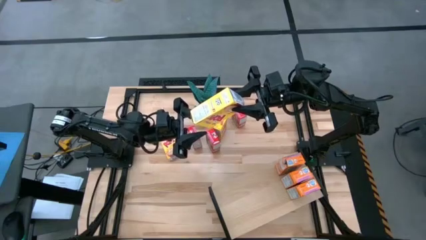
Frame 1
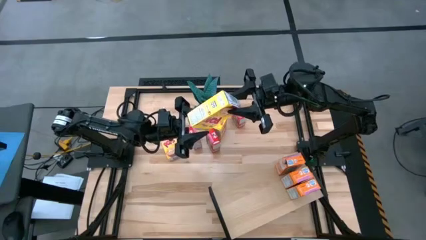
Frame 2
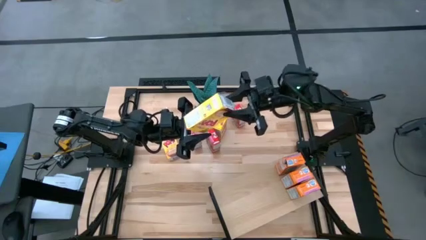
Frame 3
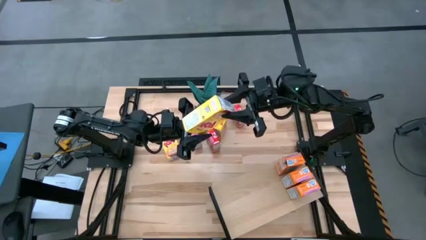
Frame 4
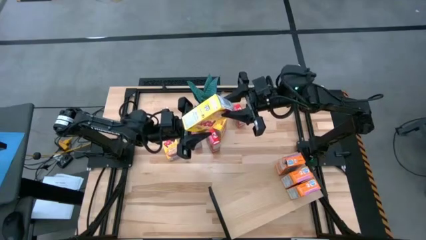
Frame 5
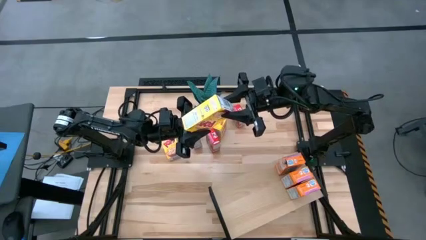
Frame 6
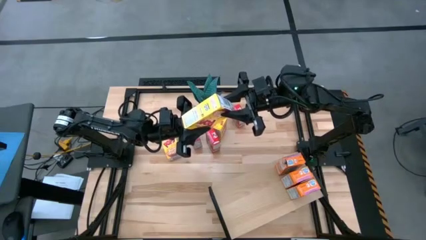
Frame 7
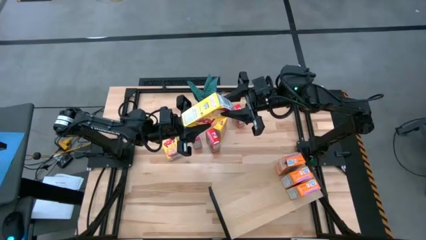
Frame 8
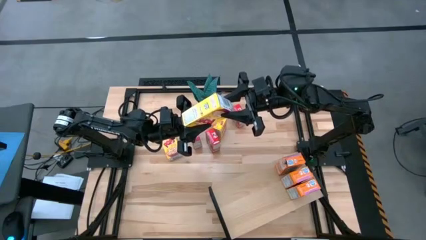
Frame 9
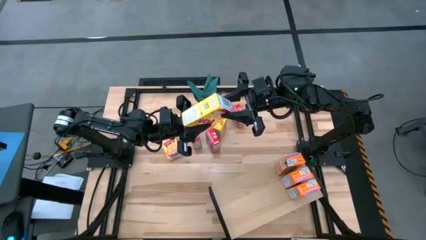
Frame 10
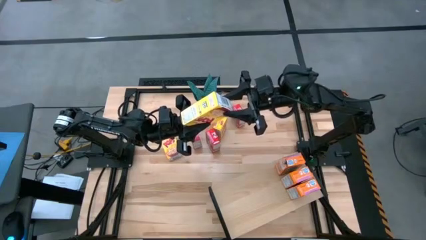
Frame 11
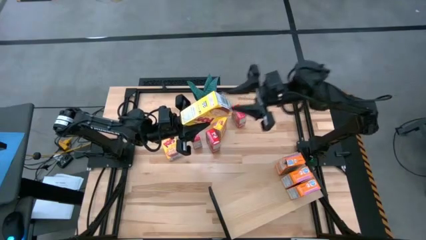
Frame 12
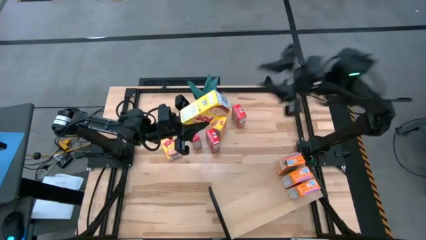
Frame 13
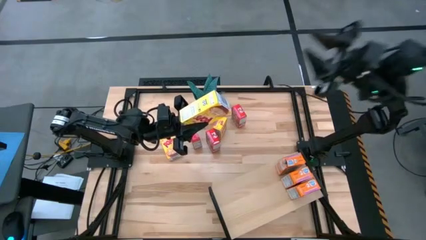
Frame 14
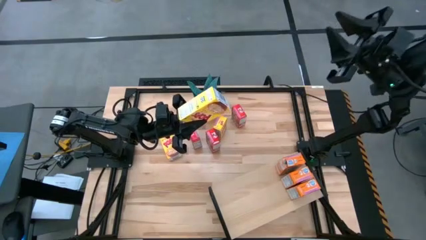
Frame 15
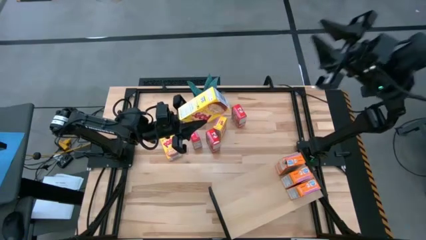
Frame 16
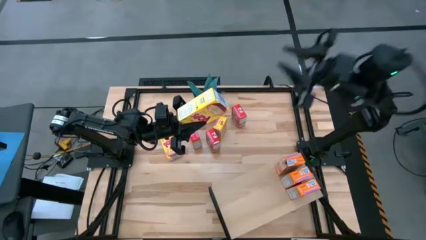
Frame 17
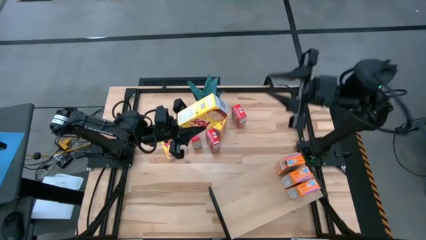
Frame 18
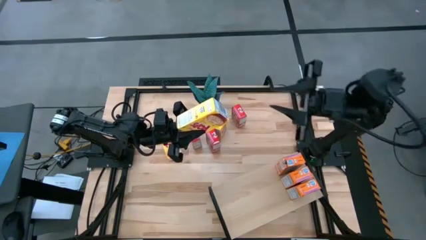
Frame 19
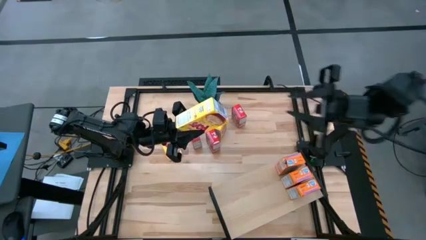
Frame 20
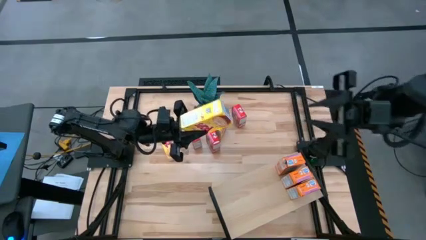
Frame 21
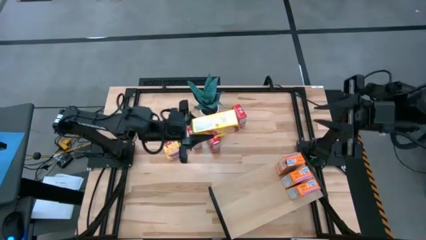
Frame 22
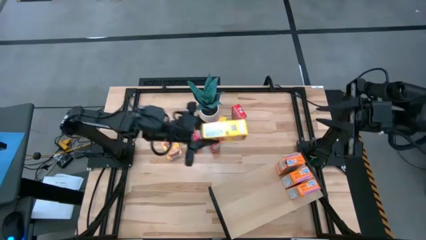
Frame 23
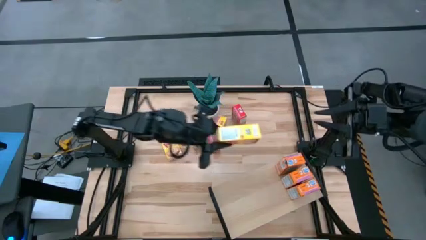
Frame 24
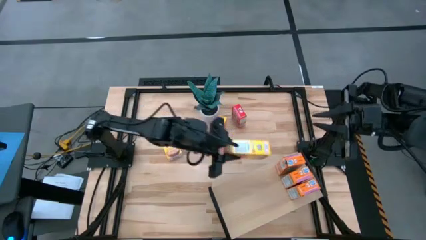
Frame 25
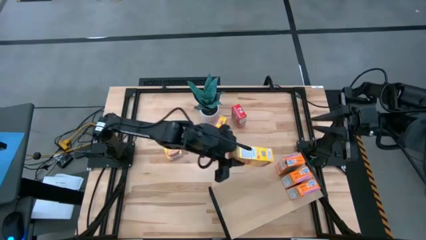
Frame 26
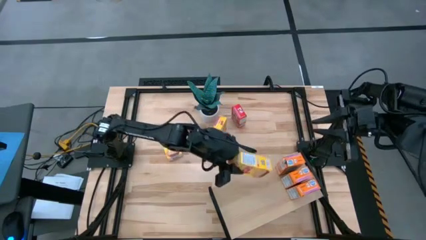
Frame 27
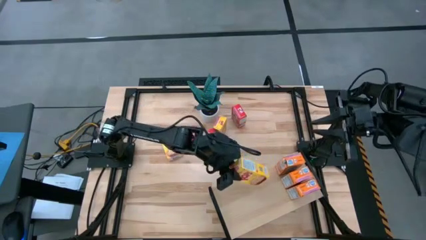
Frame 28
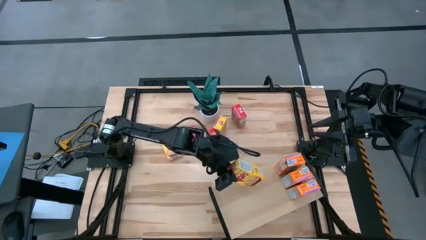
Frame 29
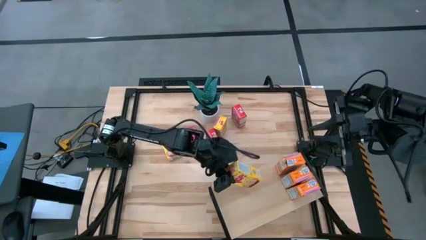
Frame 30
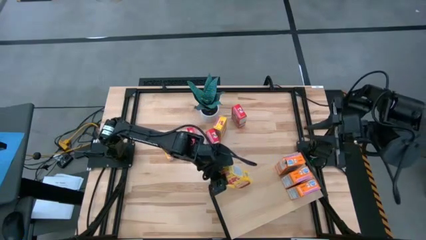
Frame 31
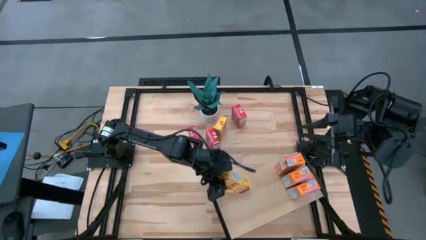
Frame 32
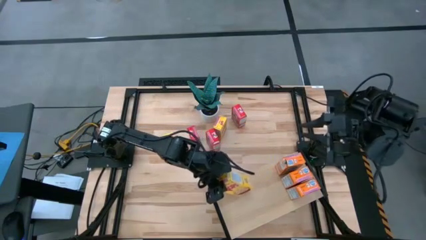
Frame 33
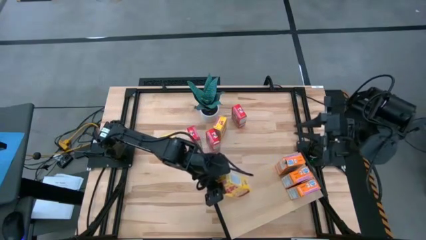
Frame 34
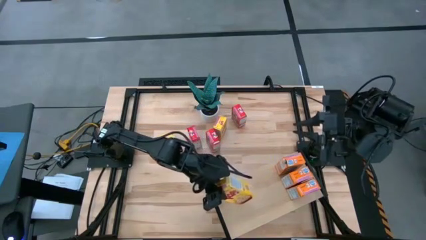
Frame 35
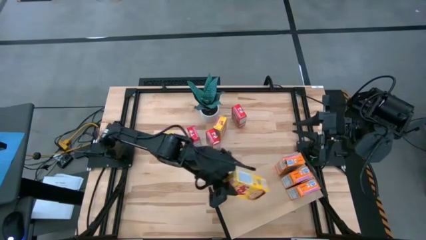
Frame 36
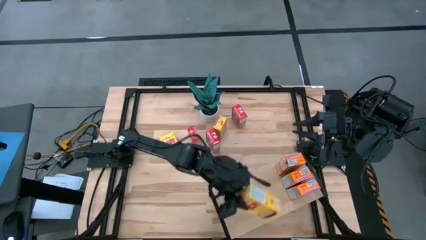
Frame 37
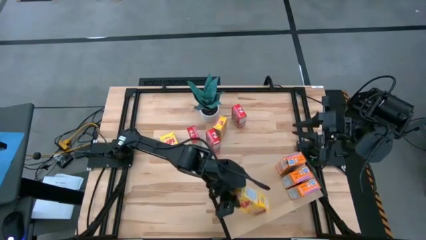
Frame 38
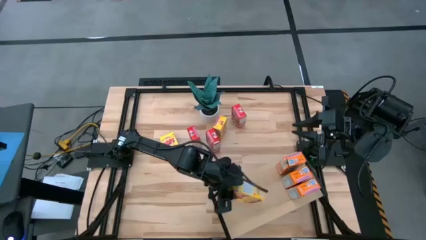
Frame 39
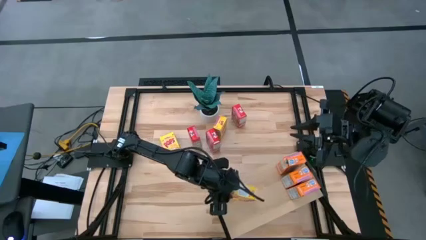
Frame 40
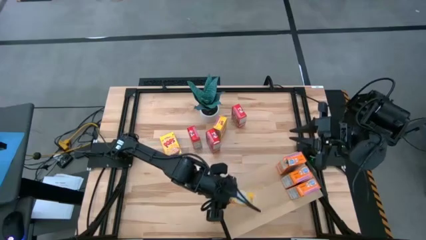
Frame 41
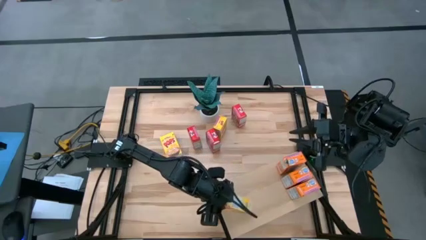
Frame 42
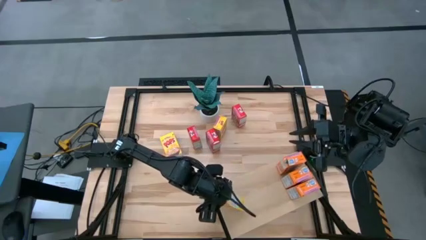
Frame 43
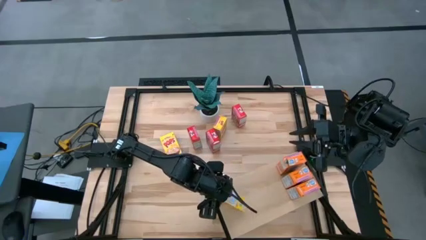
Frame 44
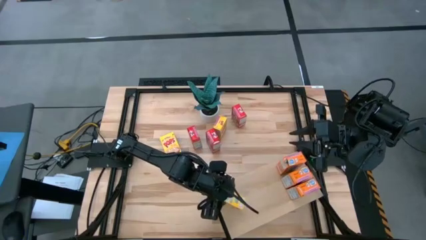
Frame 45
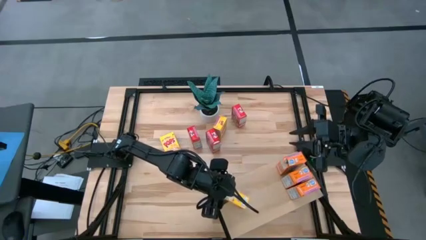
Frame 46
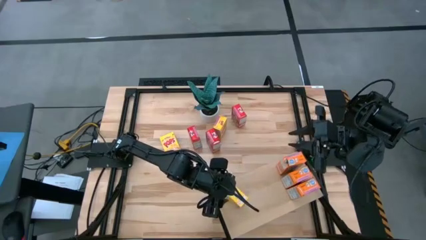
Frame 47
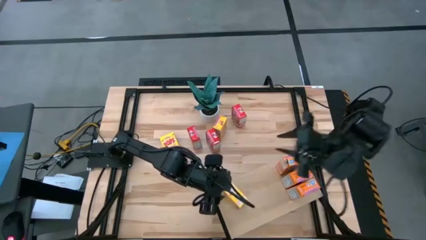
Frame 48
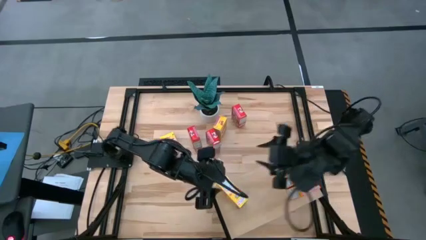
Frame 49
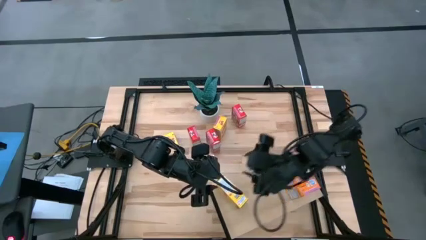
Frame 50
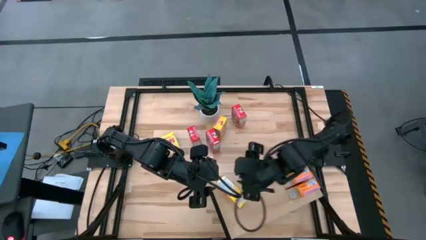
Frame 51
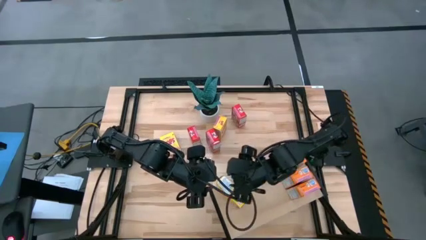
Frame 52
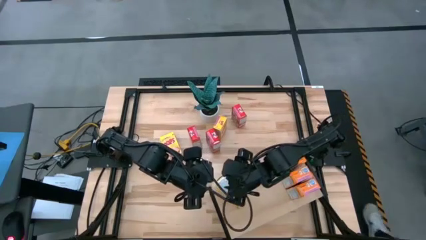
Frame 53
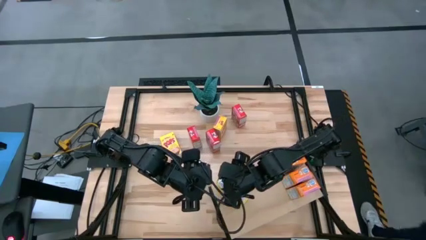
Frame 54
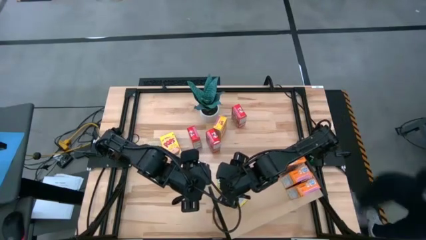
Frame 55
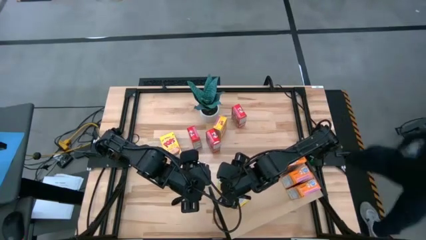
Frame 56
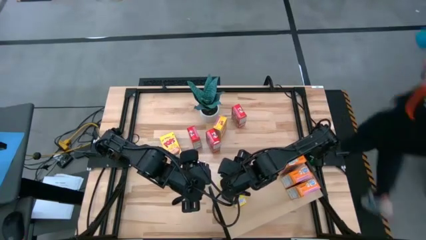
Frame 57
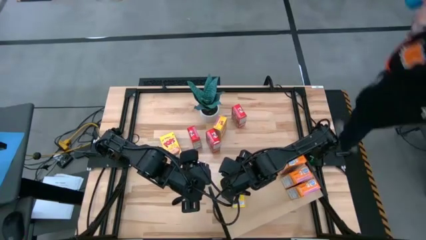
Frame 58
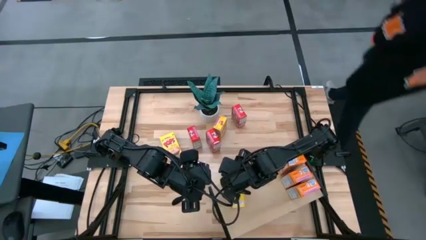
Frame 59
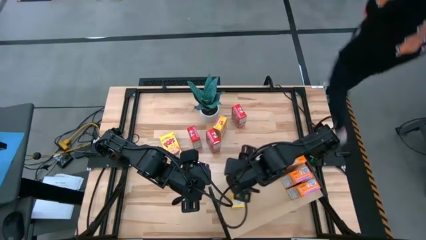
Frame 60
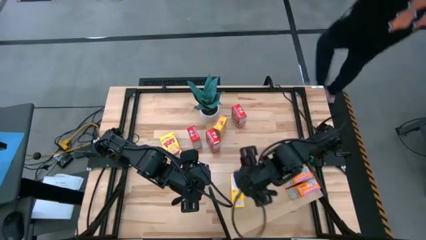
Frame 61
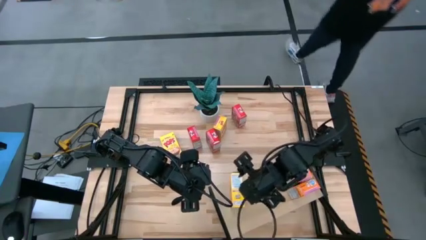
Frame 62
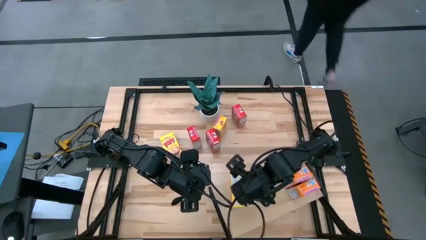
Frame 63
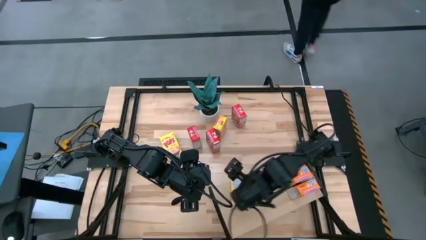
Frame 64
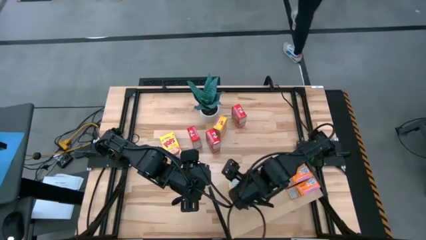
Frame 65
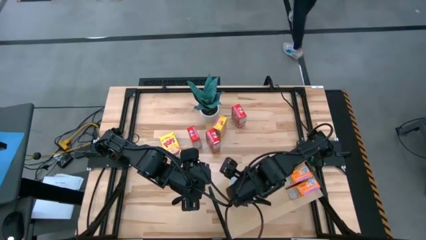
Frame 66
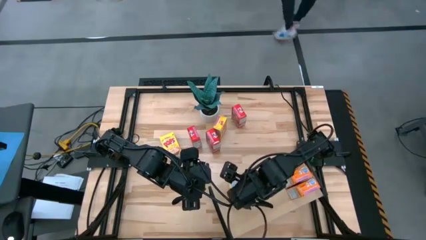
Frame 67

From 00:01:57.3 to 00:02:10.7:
Task: Stack cereal on shelf
Put the bottom right yellow cereal box on the shelf
